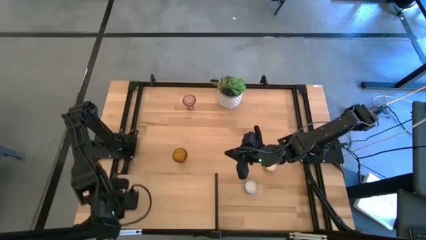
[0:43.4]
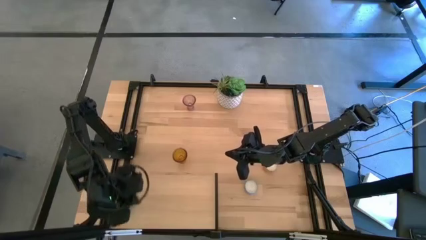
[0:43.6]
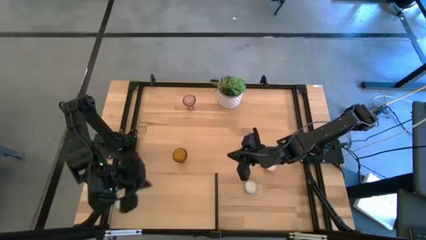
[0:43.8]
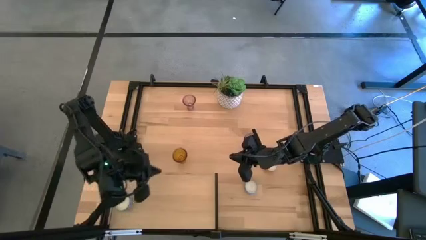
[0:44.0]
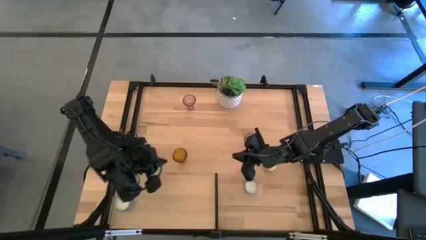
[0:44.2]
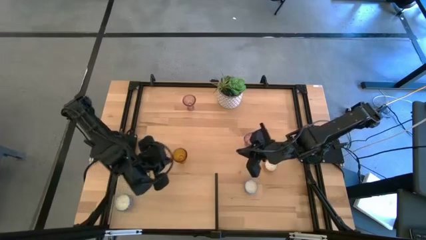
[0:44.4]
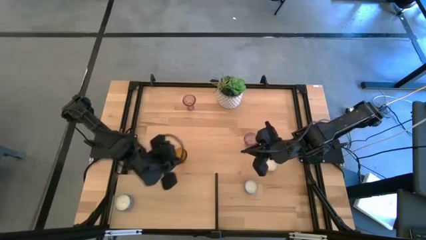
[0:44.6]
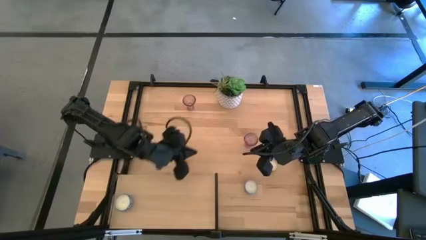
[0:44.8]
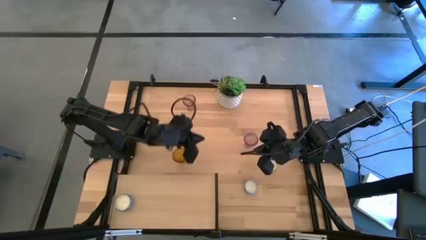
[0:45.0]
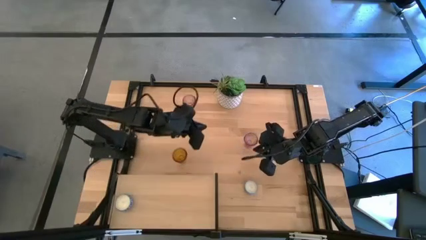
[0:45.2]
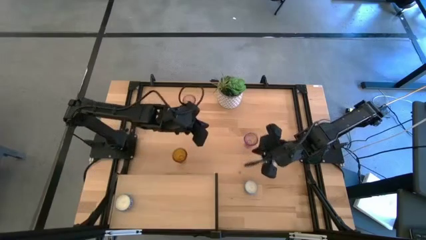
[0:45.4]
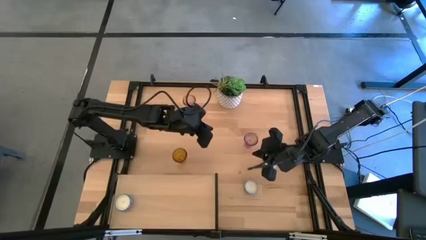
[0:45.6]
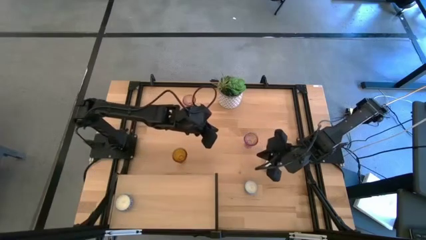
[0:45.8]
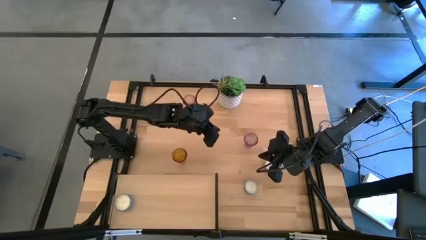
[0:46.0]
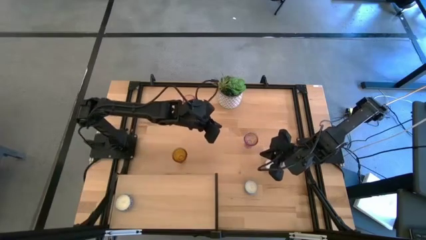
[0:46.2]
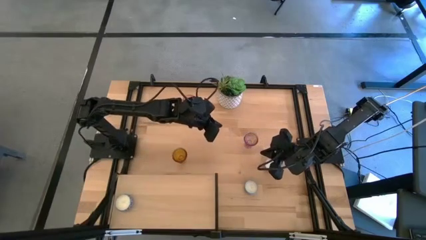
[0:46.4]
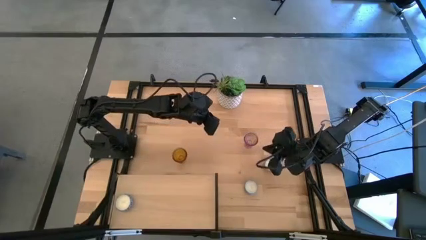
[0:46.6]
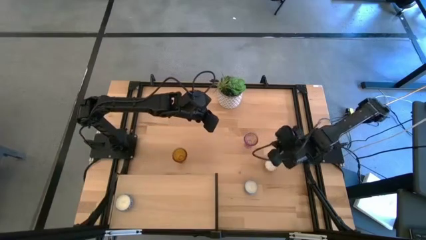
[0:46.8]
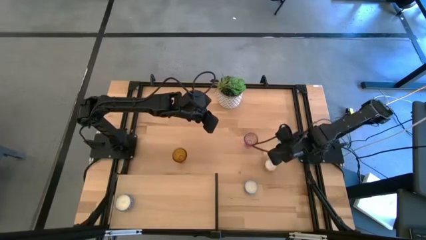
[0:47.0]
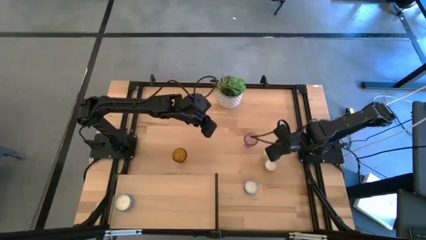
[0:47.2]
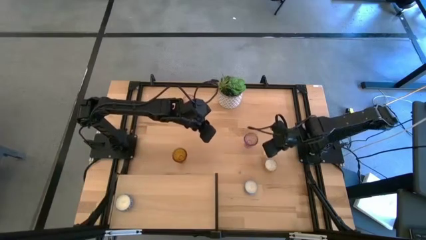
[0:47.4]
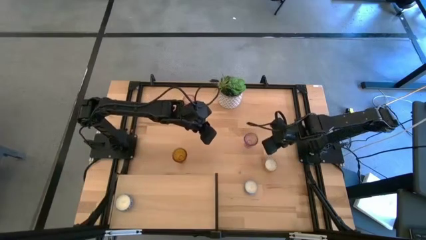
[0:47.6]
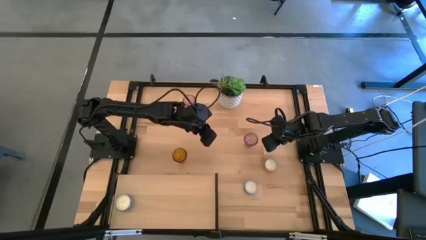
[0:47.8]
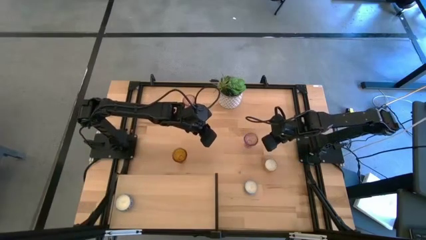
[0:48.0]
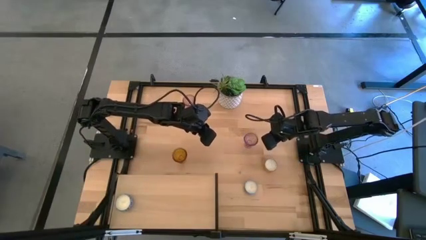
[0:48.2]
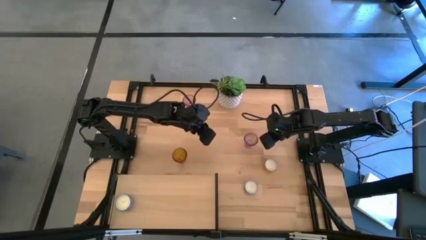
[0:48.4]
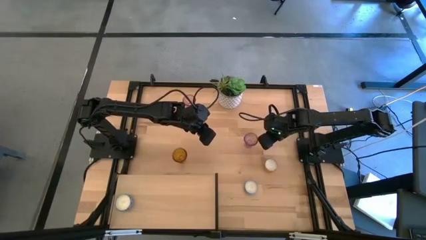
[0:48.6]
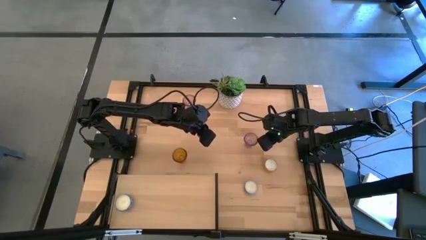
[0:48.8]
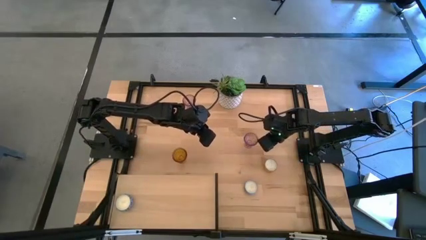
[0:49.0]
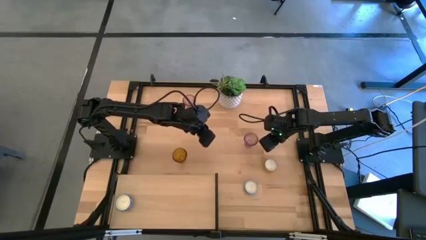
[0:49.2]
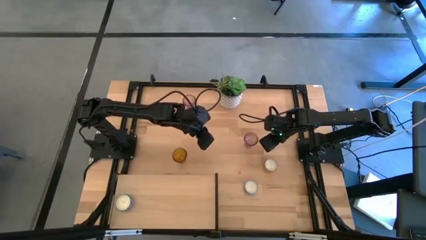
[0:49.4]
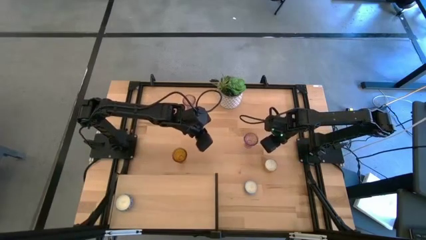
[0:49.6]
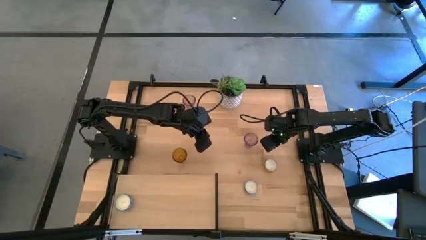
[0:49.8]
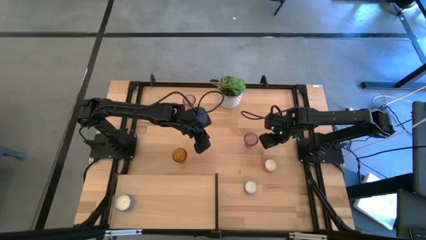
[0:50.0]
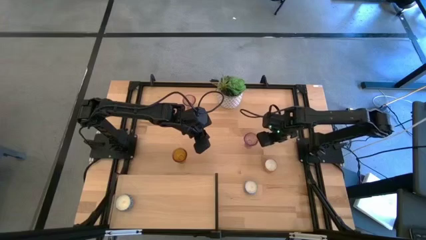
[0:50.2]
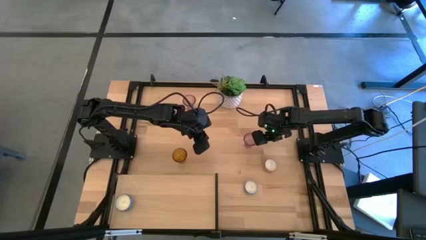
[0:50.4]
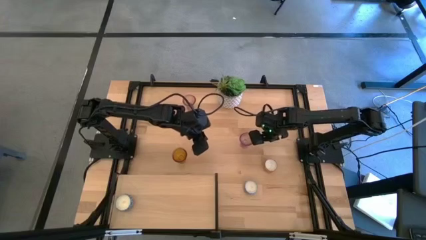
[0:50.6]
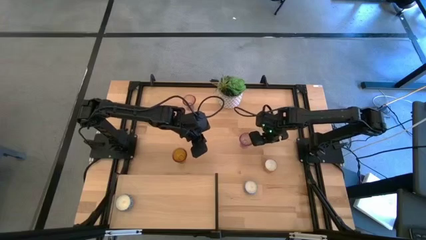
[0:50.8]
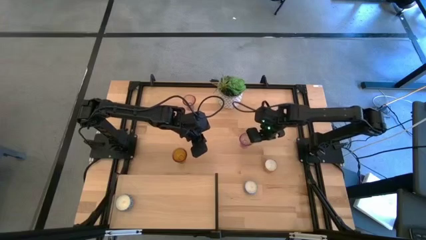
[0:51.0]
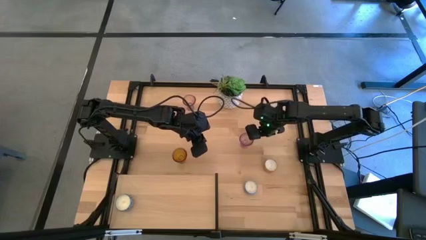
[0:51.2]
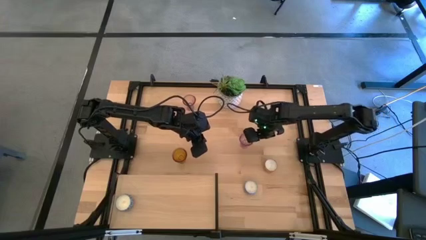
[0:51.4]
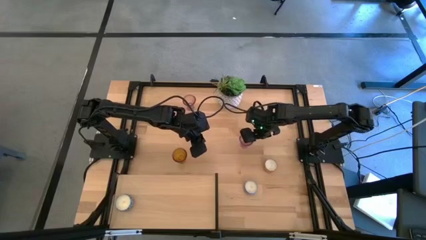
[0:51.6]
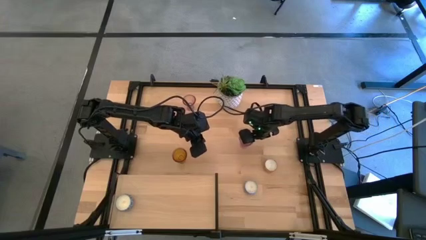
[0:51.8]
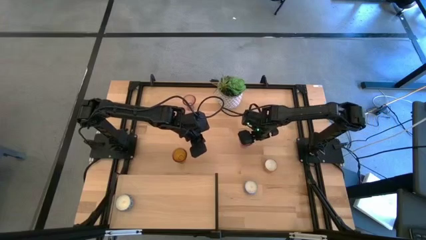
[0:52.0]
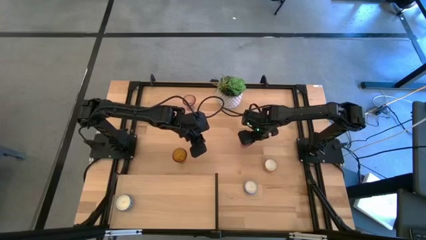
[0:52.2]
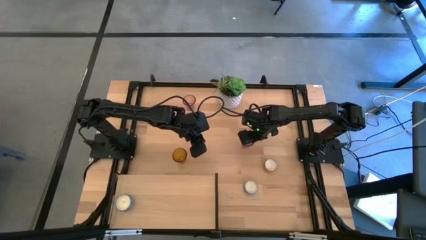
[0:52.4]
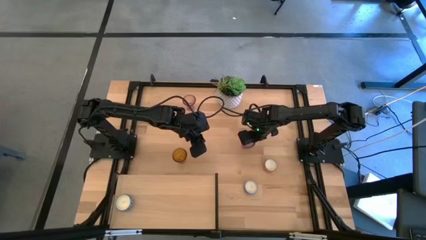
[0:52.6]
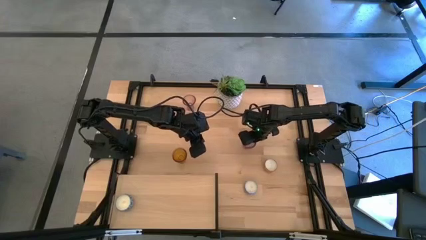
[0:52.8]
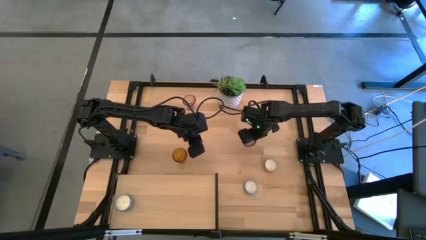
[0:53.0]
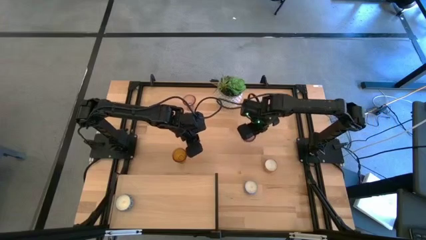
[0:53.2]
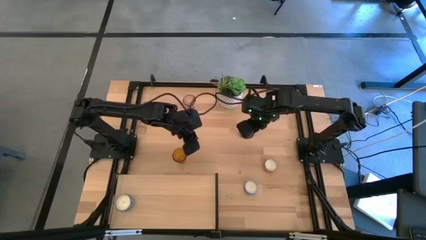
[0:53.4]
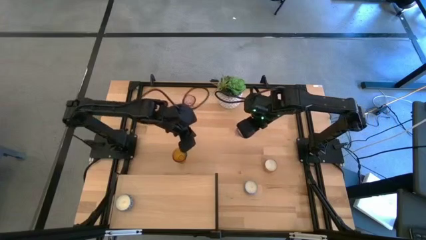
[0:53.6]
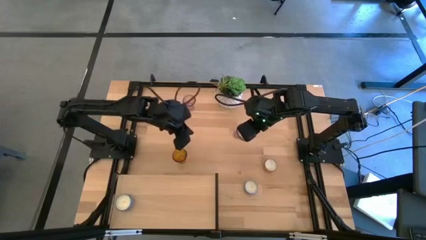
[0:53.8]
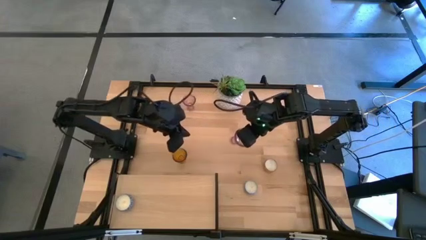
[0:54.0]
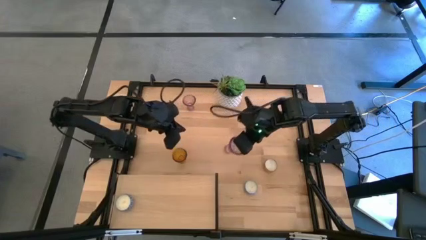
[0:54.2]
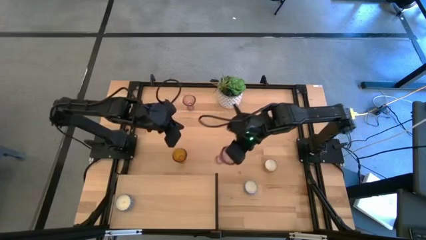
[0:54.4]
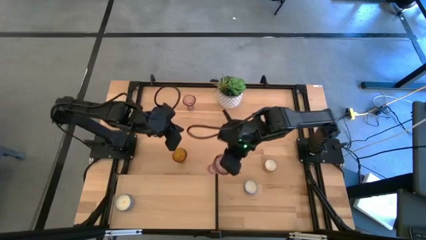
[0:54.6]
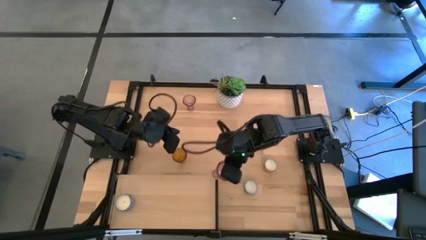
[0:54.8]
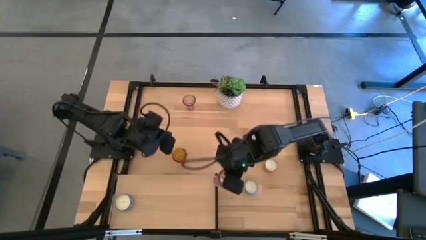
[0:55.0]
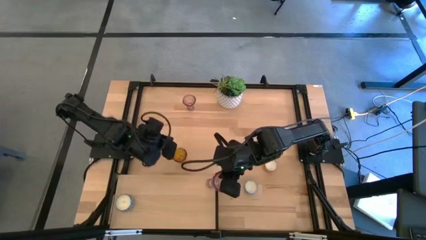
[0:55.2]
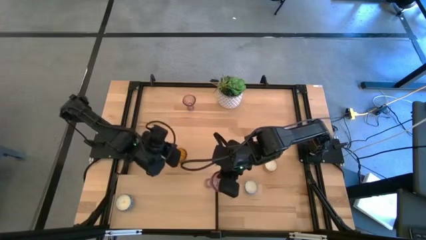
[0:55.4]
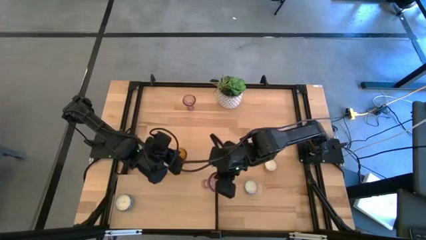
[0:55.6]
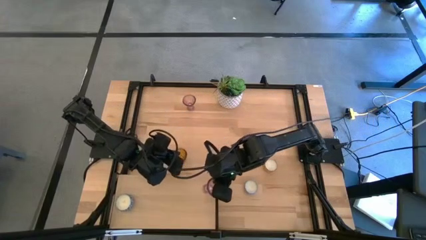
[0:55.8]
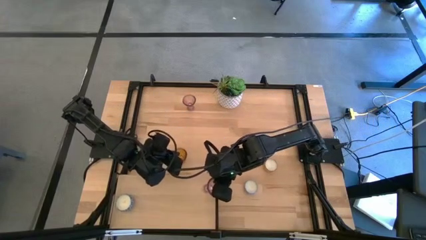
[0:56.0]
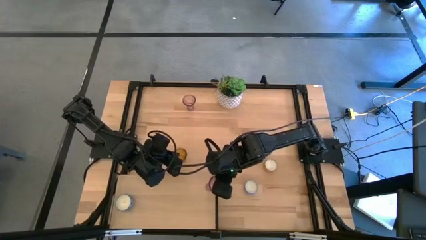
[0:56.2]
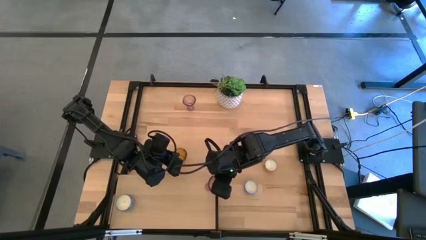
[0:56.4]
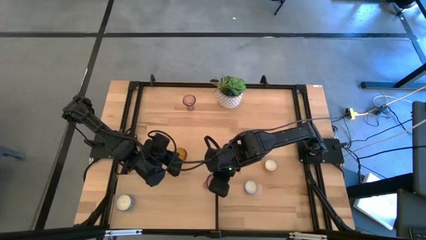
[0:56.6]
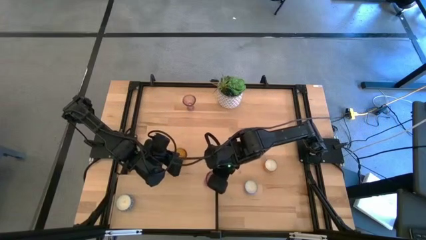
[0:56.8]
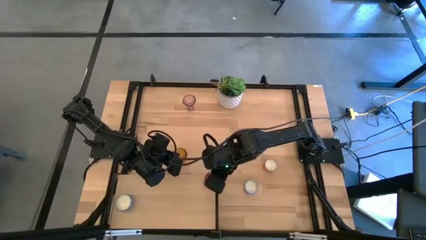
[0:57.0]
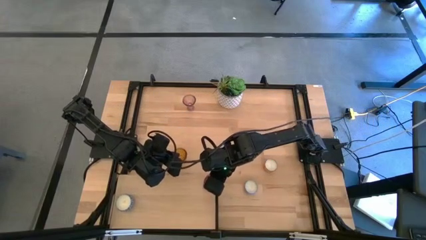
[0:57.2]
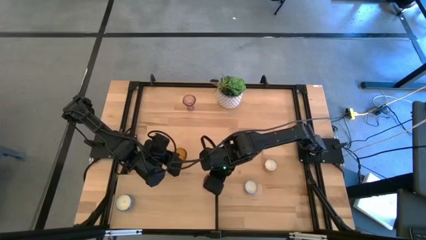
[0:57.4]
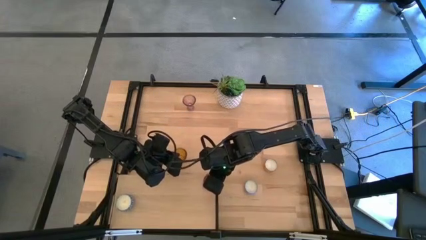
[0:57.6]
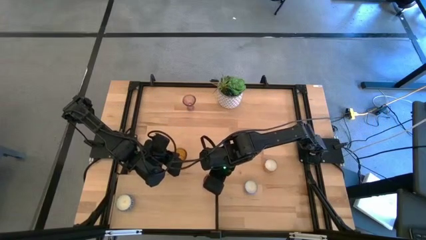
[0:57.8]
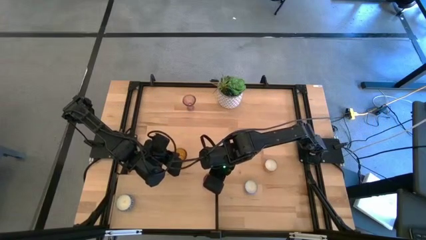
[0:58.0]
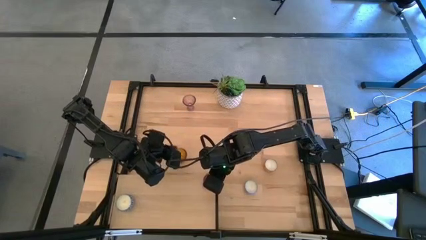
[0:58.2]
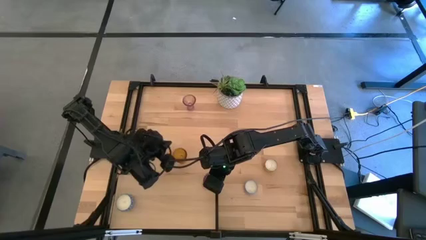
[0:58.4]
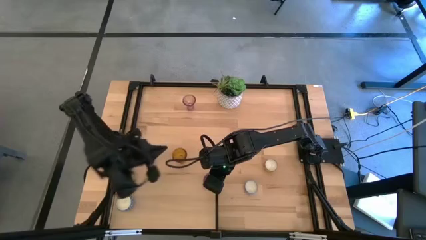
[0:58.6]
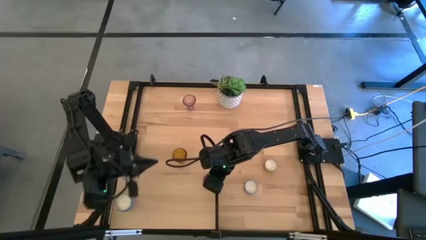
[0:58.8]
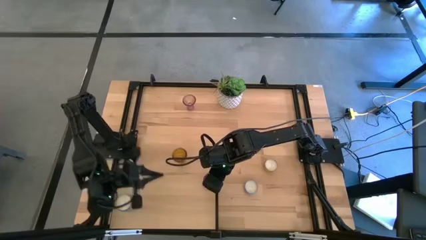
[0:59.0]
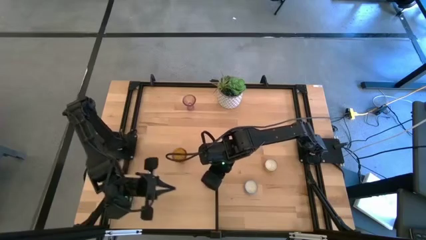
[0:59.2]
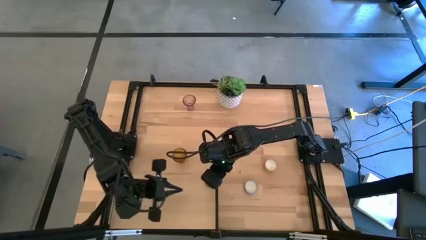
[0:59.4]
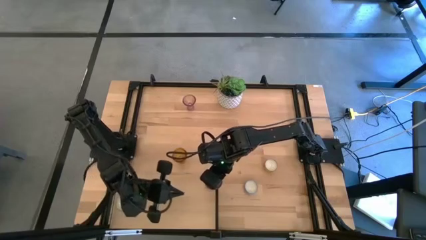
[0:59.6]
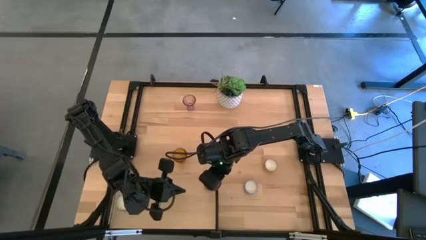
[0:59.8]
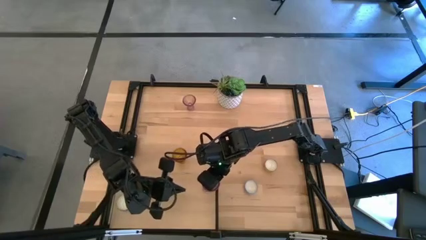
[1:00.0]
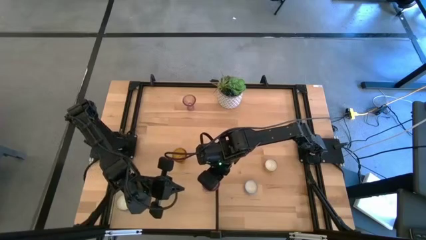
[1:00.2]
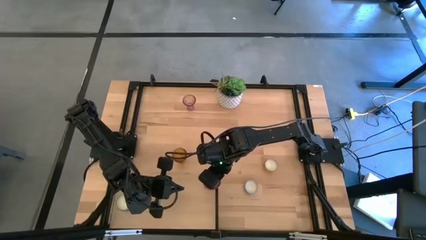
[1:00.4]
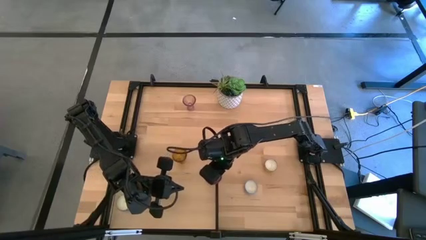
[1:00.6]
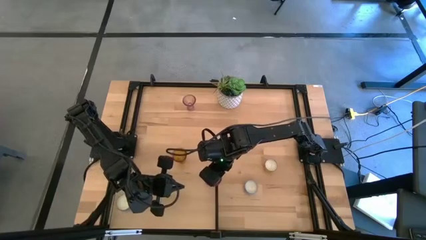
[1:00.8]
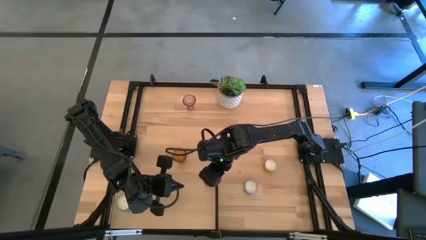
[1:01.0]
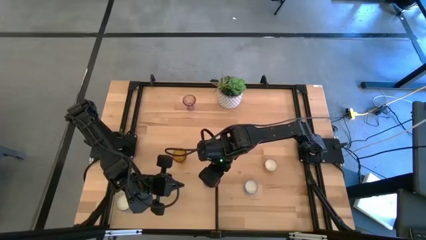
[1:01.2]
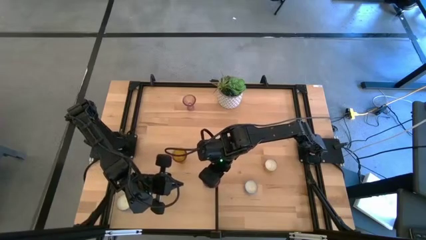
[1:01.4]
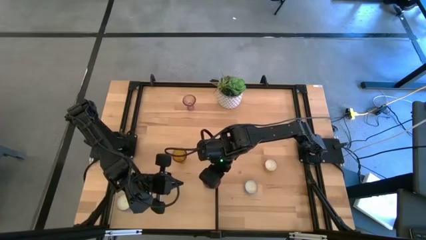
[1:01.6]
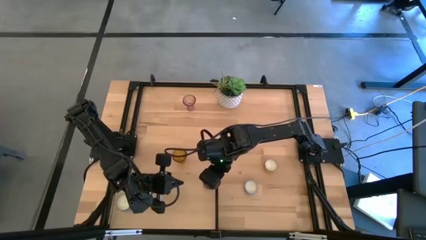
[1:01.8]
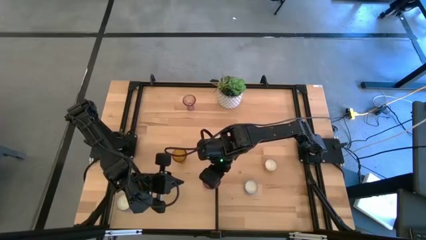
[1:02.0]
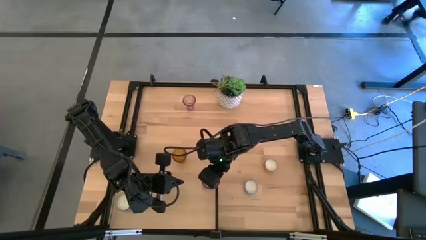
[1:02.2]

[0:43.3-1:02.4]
Task: Pick & Place candle stick holders
Put the bottom pink glass on the shelf
